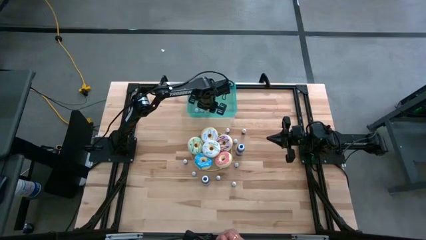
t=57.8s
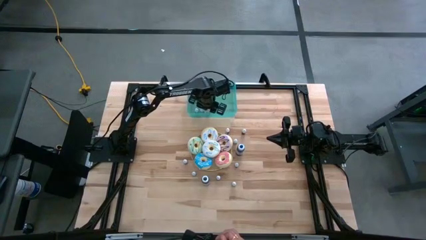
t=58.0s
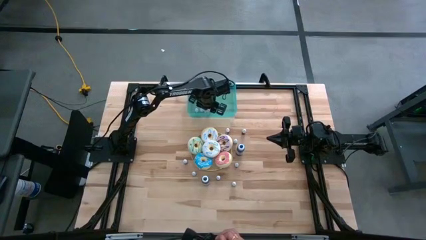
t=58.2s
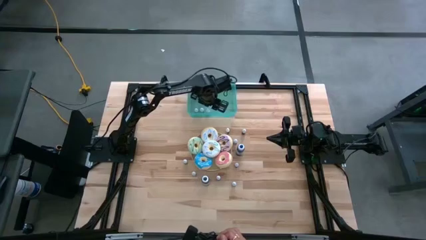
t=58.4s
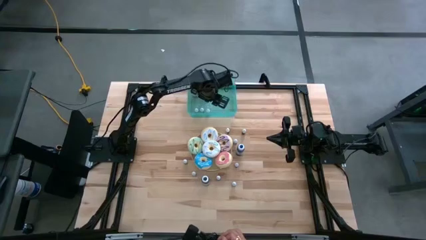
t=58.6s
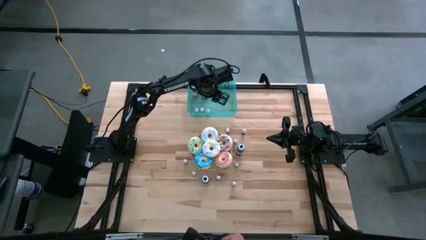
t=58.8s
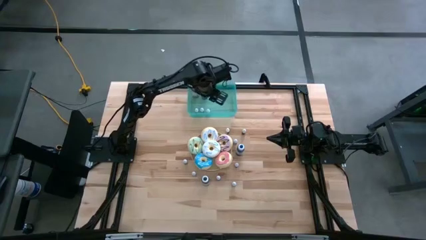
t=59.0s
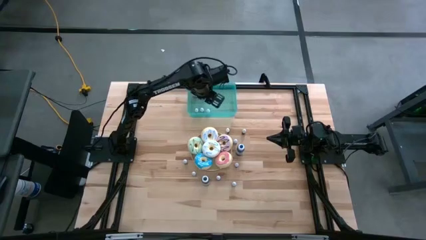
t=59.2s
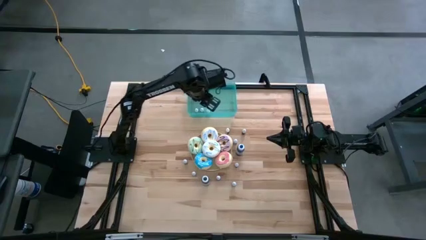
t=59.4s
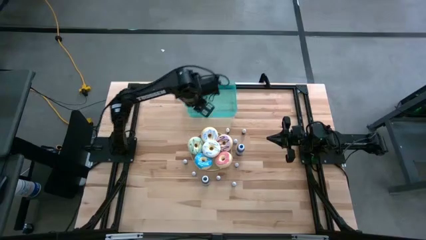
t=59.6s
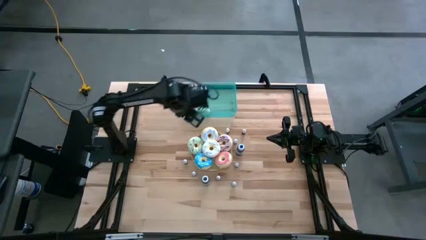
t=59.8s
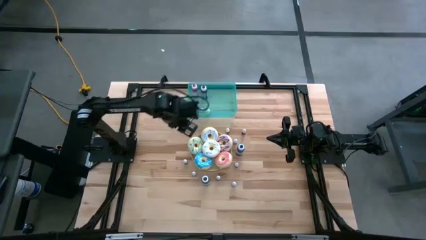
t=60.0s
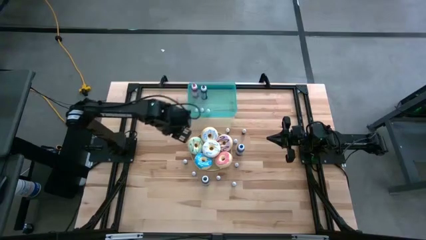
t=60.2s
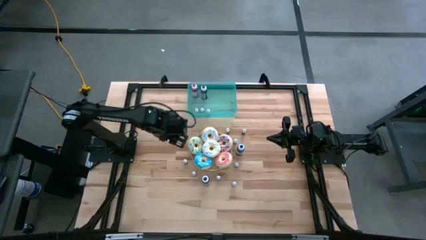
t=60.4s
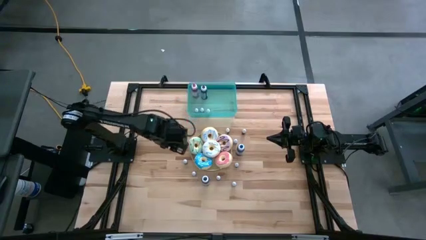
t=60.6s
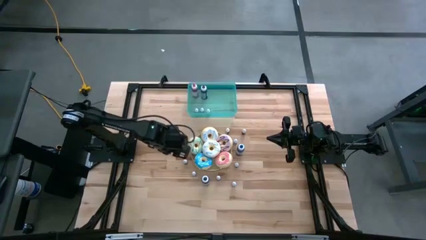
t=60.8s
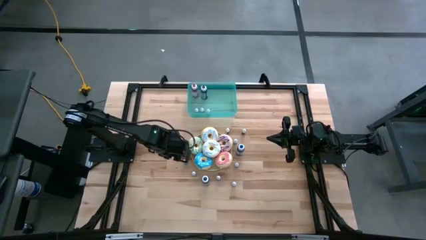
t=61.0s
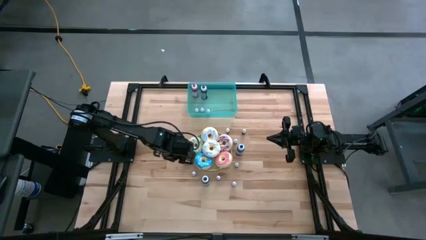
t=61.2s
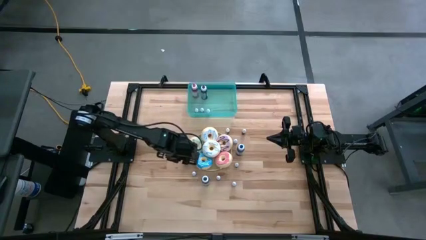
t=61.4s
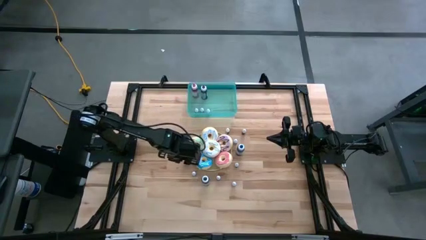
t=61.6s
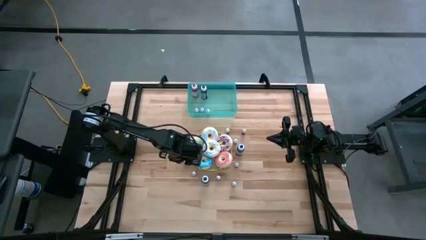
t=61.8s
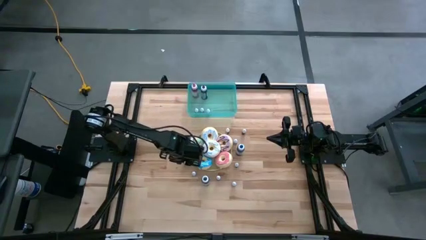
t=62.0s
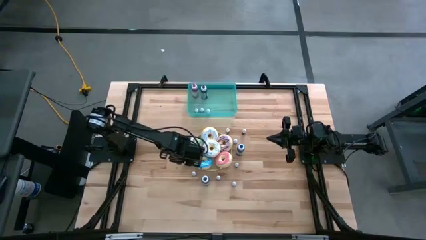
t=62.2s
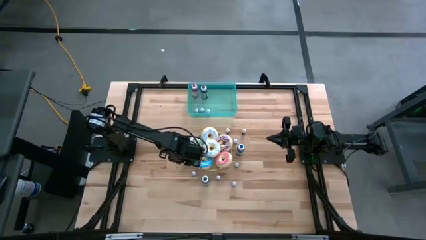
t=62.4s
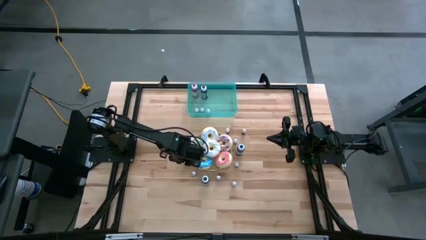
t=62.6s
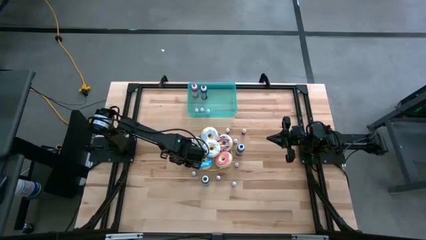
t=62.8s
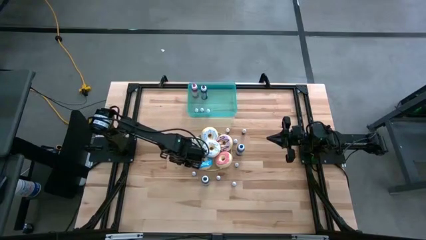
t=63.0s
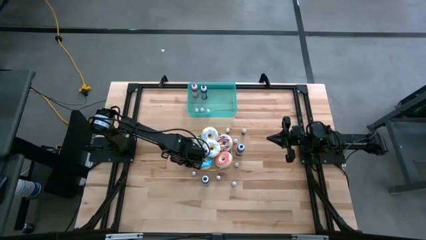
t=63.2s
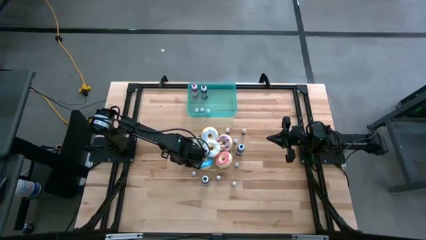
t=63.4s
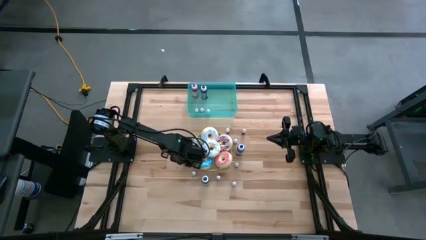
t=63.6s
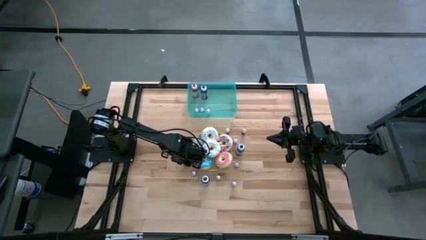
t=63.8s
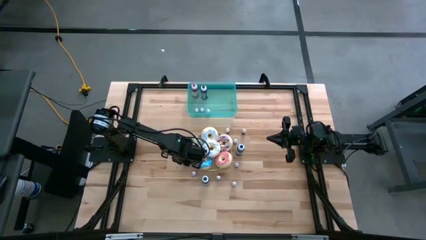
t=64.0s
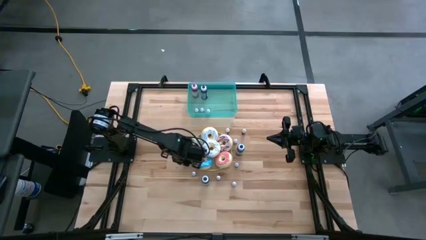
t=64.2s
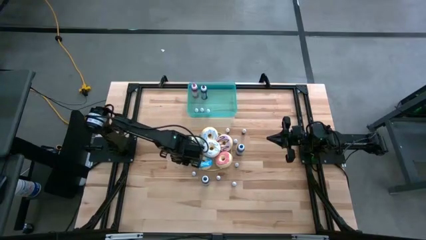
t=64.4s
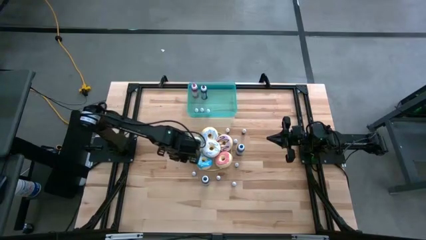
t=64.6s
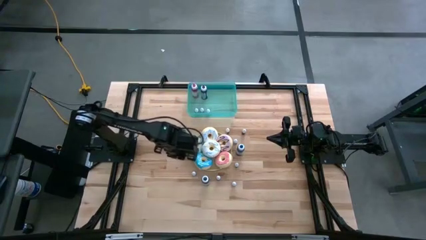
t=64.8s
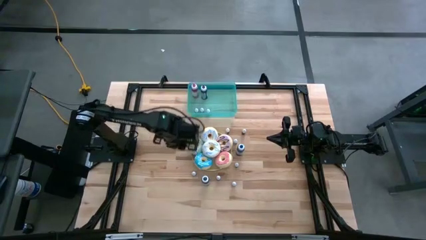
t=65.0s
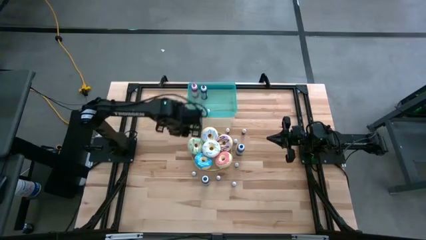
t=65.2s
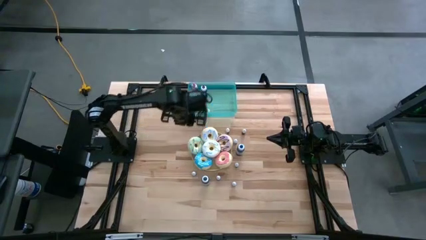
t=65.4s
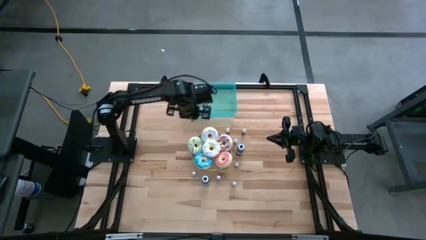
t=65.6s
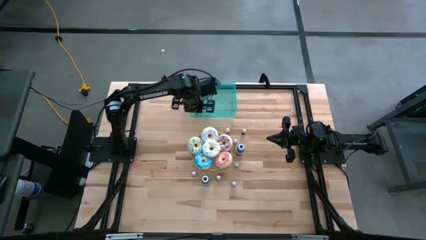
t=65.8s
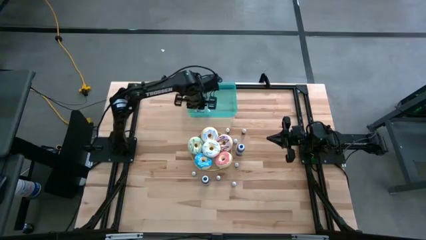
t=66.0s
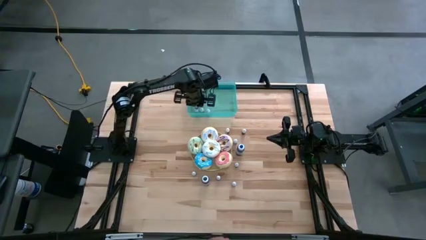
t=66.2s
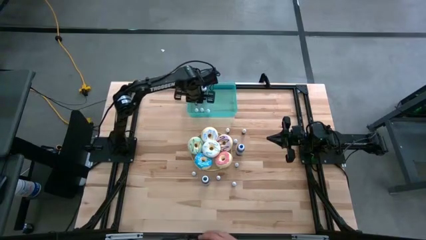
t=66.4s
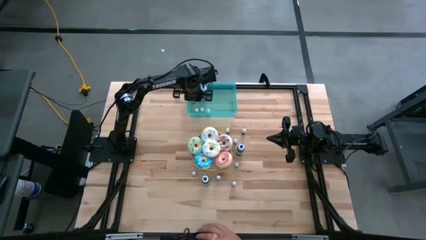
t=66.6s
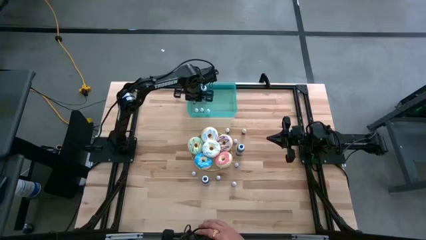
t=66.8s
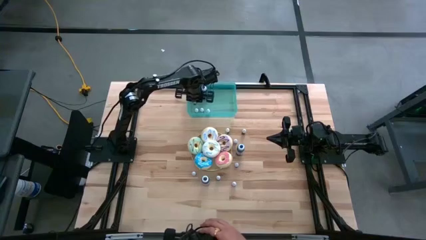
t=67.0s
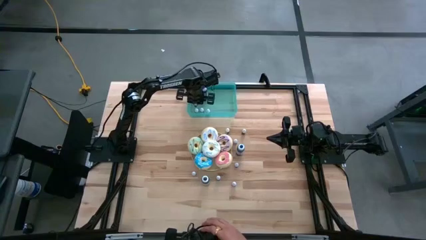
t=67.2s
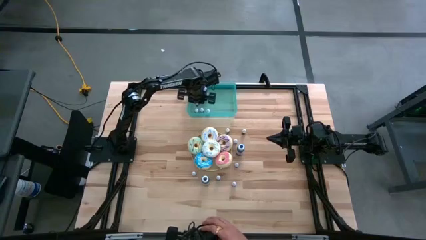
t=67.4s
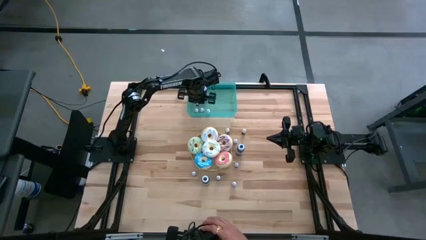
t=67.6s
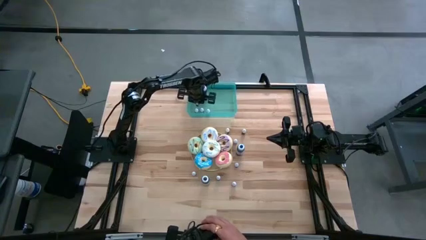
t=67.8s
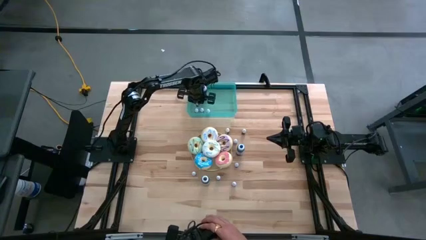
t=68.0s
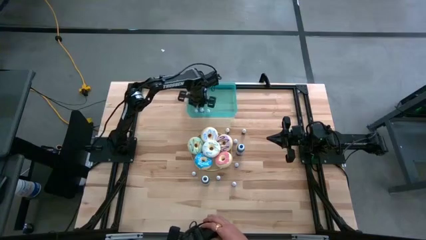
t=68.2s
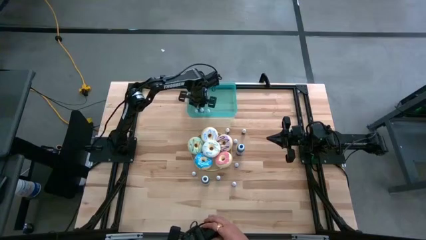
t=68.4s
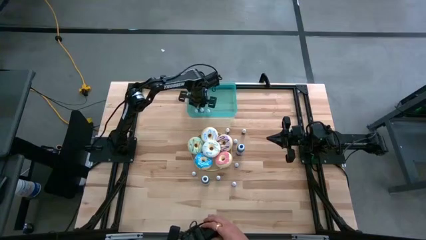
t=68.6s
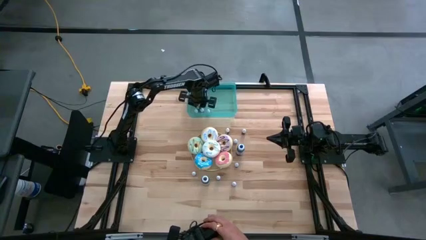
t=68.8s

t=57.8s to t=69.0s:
Task: Pick & Place food coloring
Put the bottom small green food coloring bottle into the green container

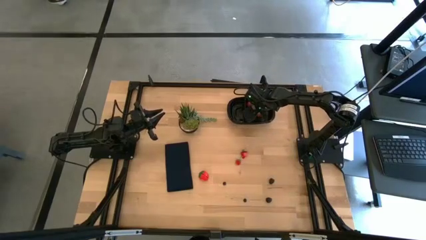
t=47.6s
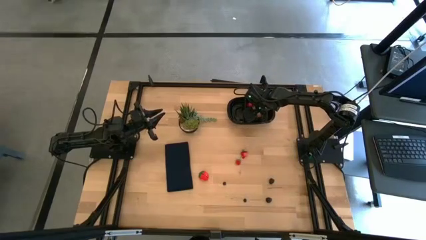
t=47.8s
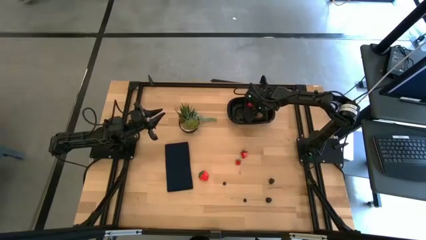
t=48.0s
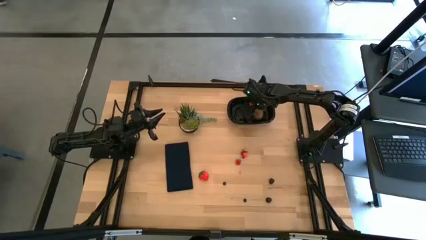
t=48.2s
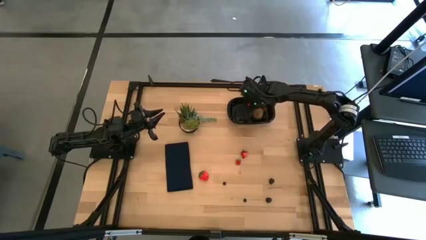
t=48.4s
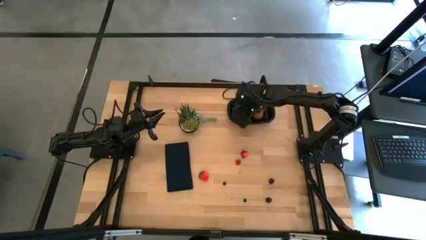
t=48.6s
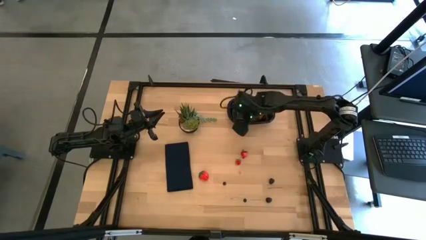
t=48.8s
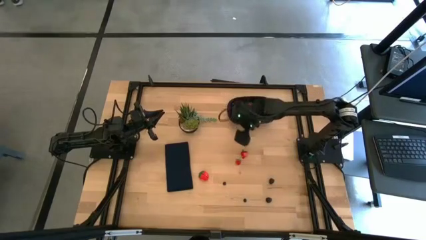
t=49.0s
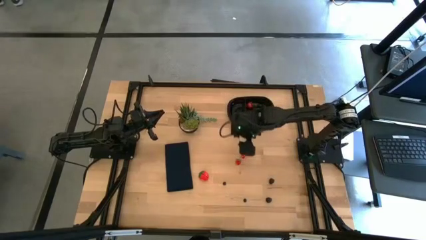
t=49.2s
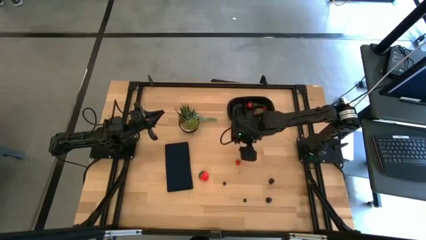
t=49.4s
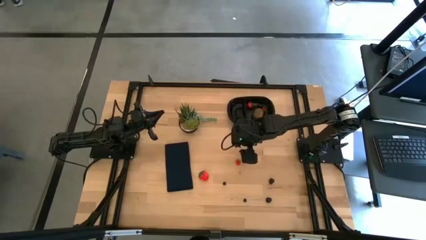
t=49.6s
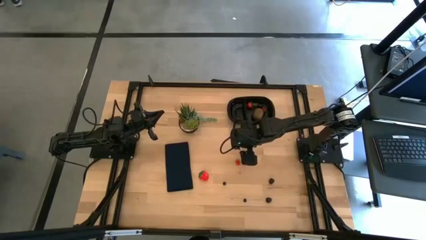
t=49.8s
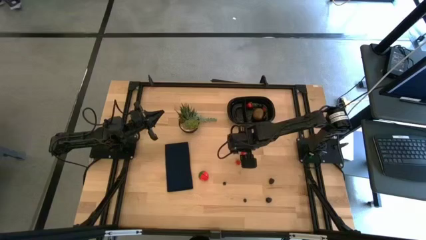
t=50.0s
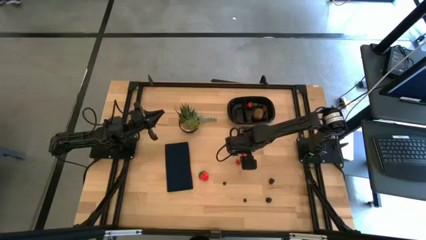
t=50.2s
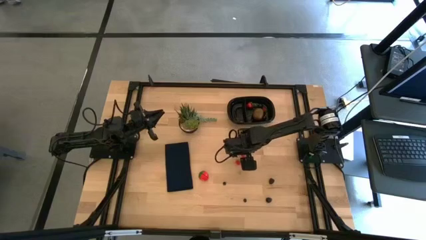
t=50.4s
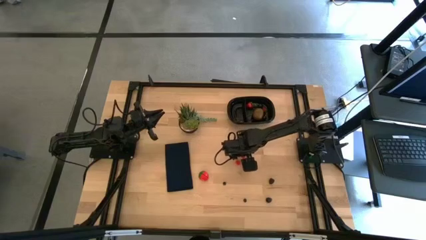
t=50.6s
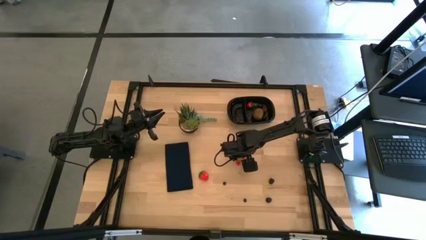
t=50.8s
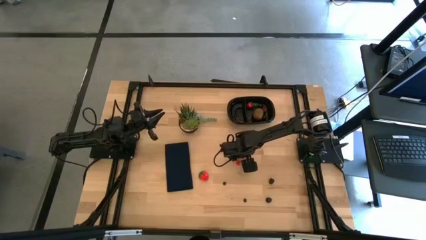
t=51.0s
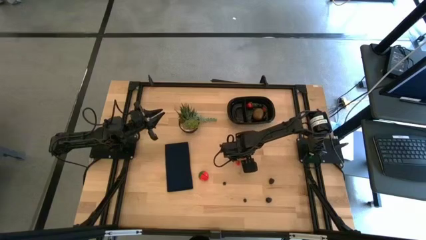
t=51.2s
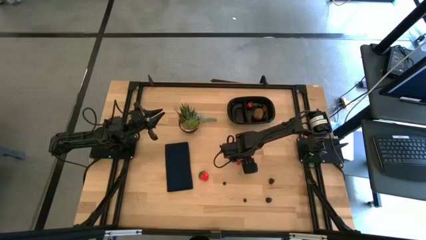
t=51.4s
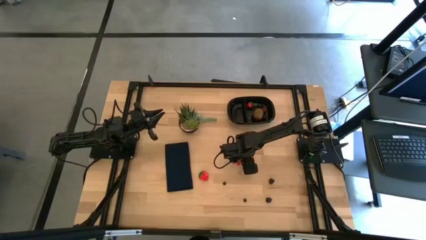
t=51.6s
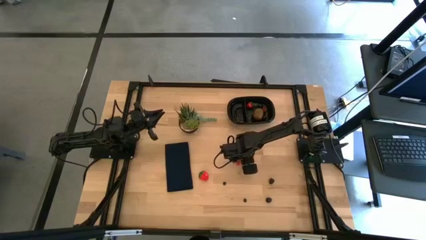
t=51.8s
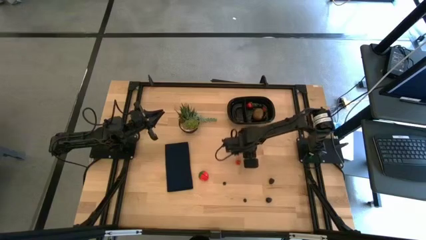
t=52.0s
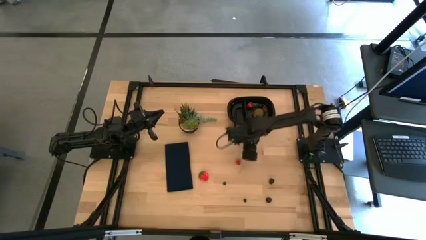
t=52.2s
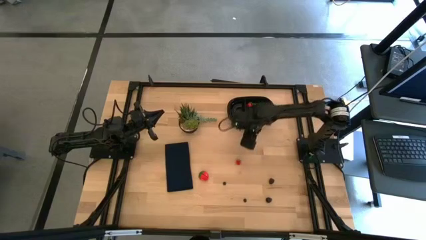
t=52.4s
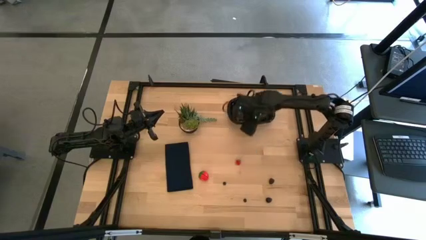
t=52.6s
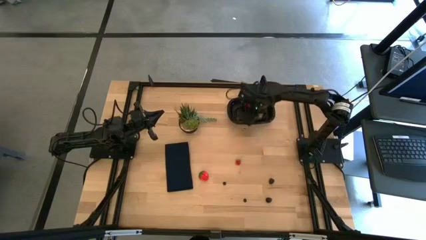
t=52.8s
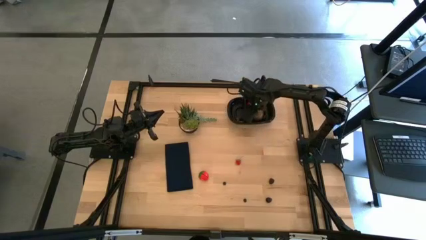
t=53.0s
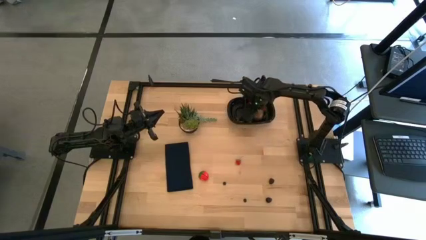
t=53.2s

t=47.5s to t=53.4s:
Task: Pick and placing Produce into tupperware
Put the strawberry into the black container
